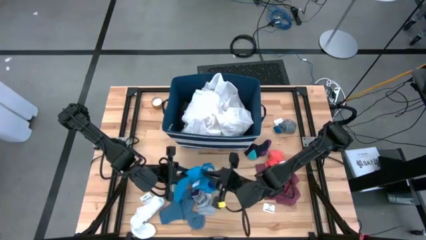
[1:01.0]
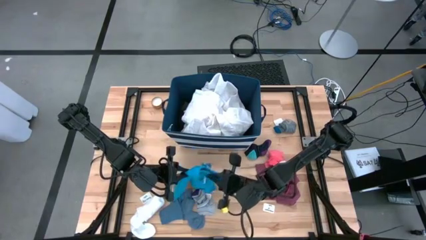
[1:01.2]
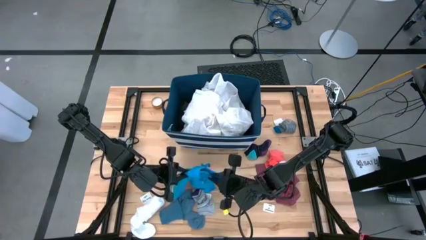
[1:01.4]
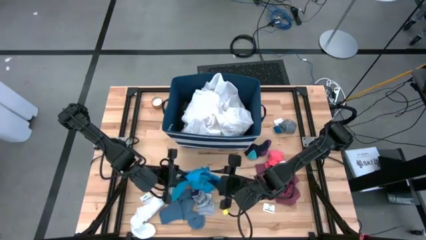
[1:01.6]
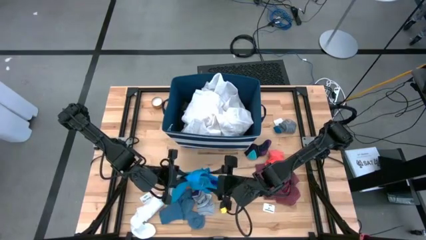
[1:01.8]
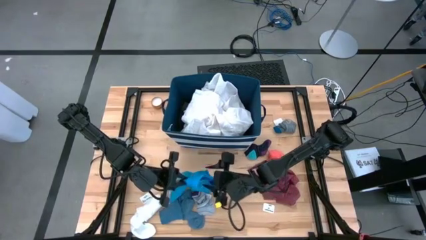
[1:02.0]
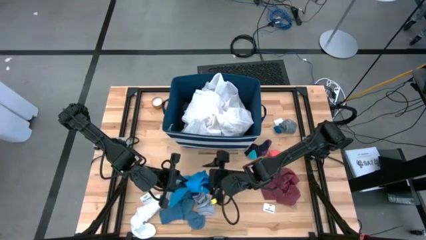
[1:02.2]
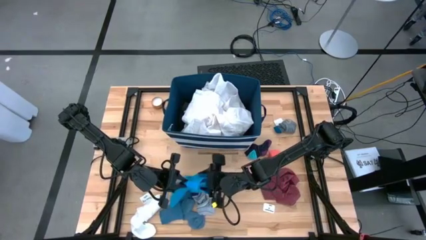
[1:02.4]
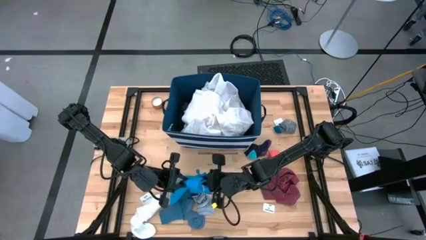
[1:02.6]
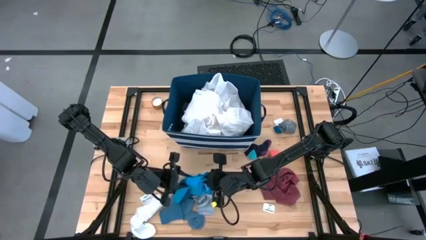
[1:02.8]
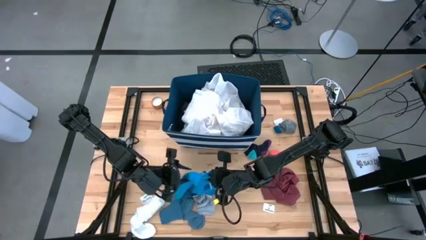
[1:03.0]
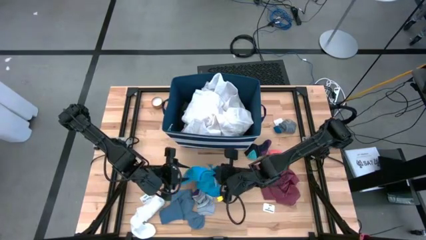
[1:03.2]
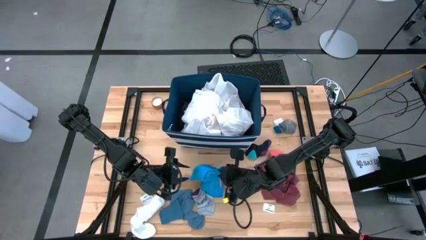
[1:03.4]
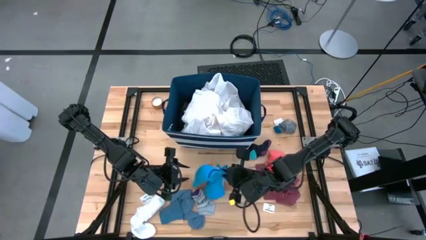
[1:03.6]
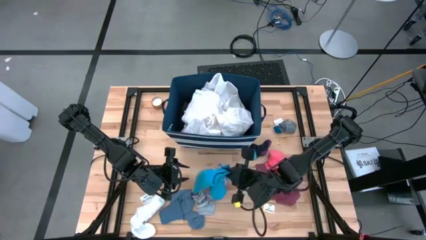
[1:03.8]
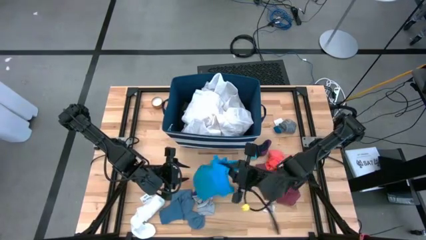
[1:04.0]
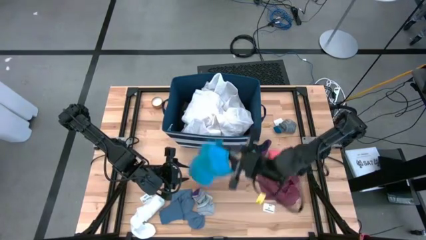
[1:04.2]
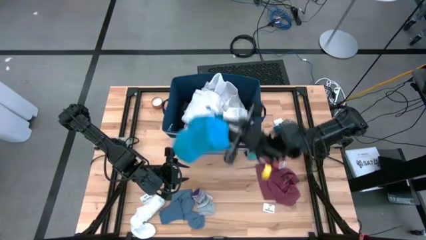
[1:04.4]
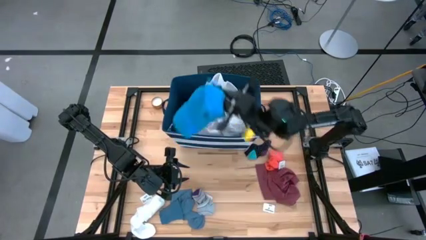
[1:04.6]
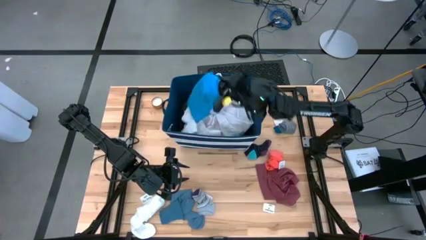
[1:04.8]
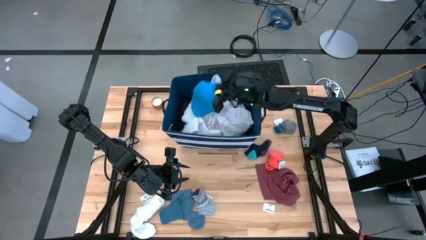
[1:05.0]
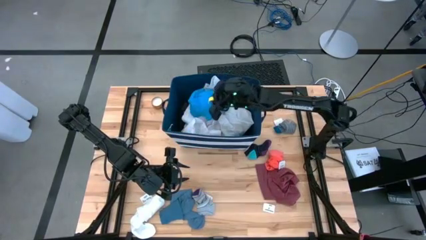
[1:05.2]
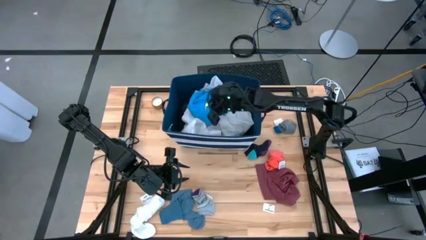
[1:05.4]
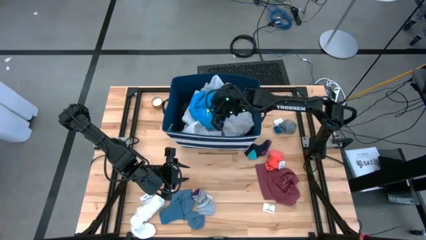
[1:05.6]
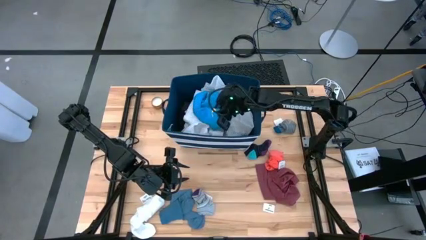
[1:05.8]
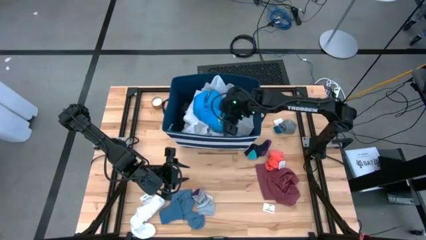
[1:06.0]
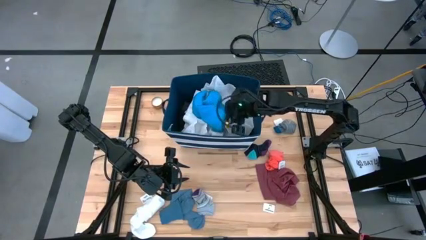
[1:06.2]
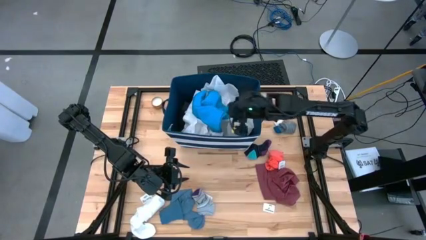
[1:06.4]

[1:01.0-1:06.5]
Task: Sort clothes
Put the blue short into the laundry organizer

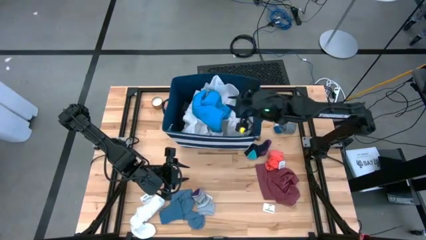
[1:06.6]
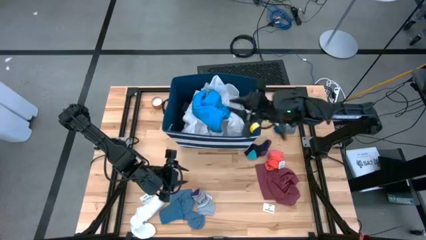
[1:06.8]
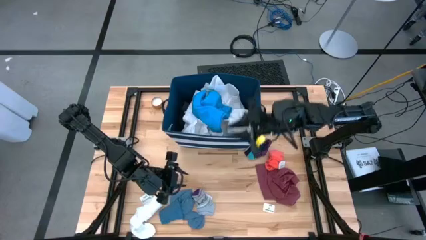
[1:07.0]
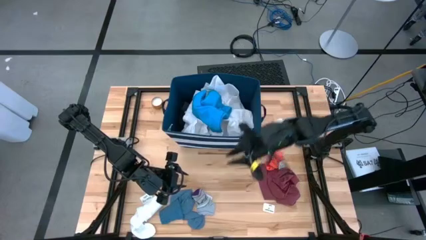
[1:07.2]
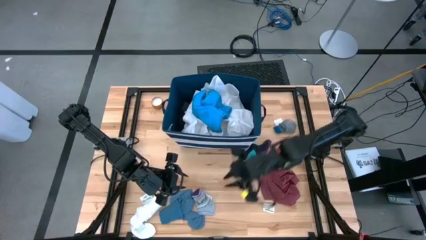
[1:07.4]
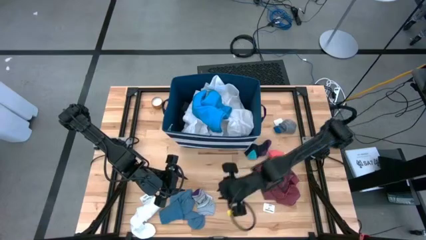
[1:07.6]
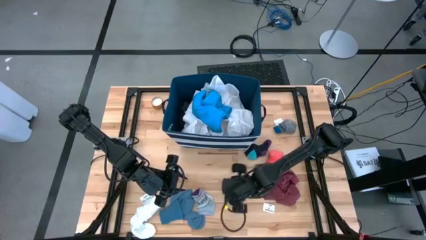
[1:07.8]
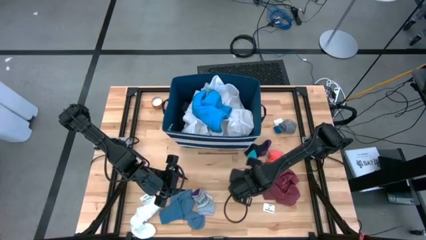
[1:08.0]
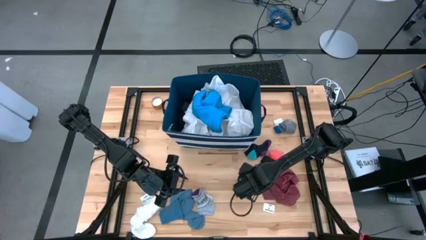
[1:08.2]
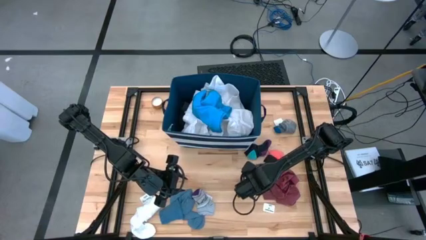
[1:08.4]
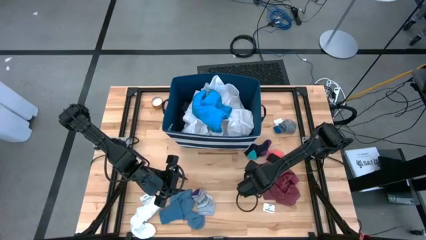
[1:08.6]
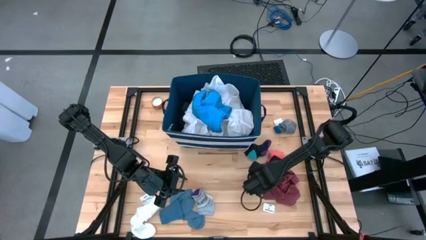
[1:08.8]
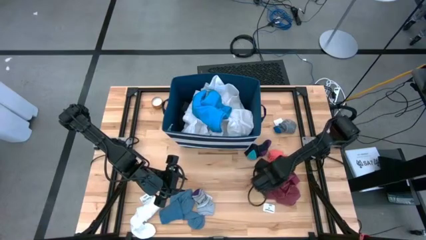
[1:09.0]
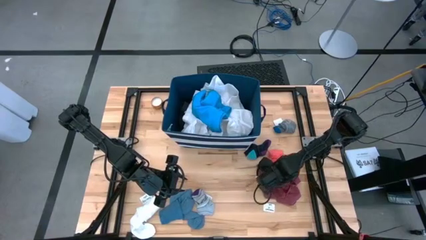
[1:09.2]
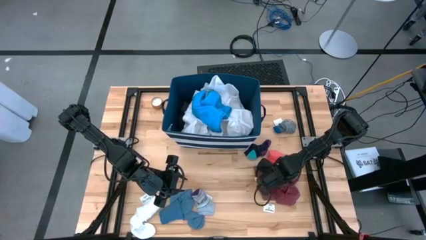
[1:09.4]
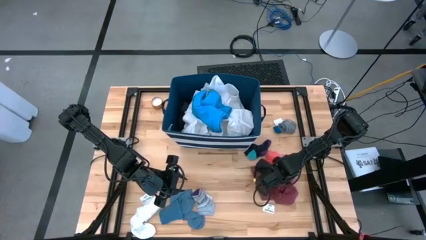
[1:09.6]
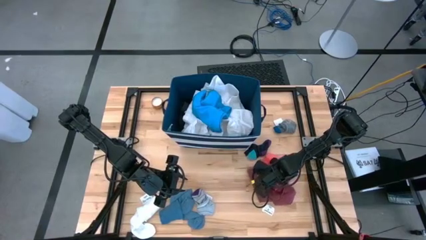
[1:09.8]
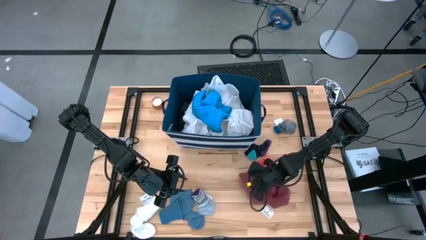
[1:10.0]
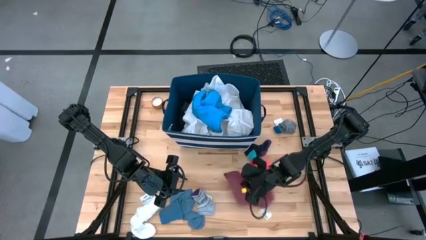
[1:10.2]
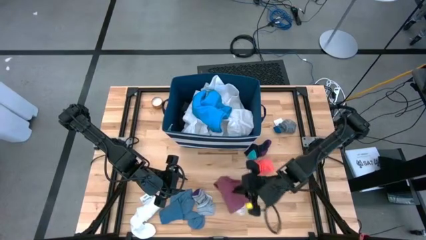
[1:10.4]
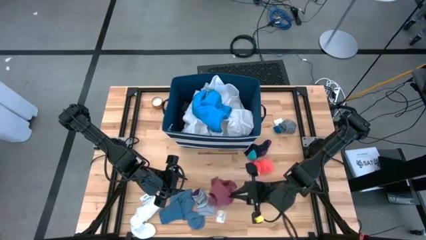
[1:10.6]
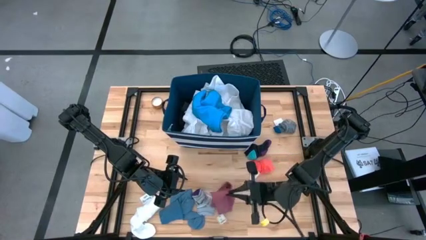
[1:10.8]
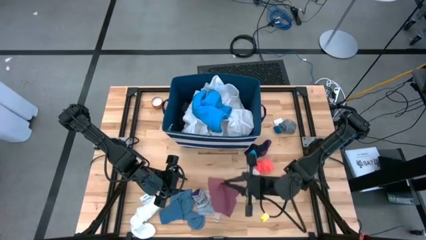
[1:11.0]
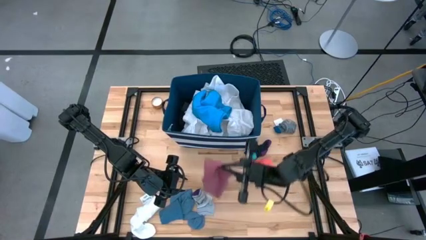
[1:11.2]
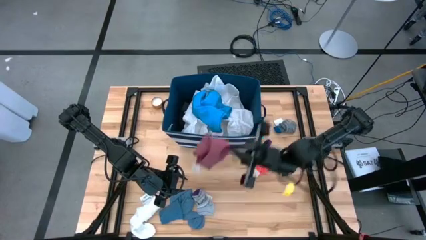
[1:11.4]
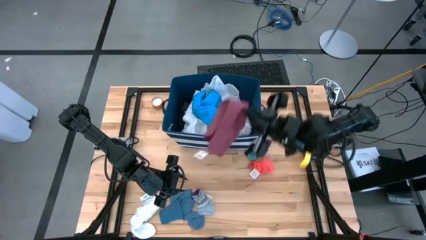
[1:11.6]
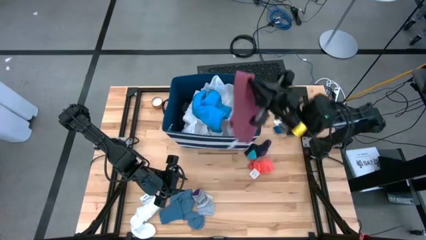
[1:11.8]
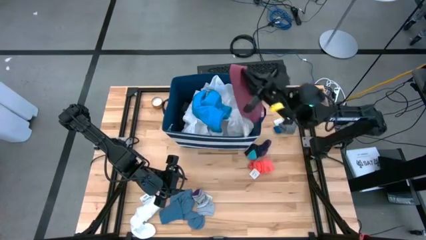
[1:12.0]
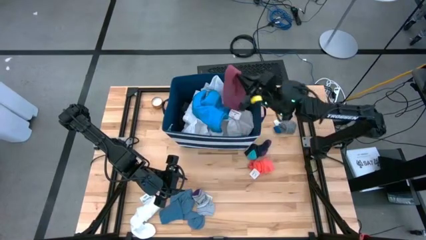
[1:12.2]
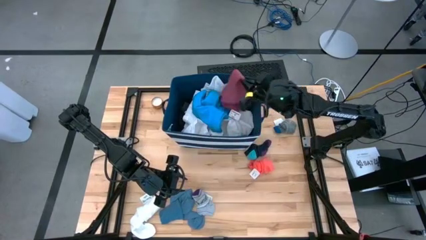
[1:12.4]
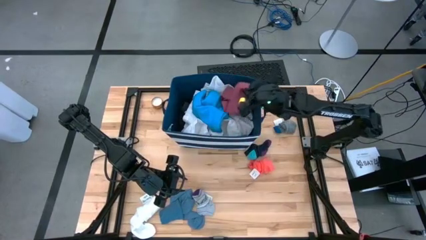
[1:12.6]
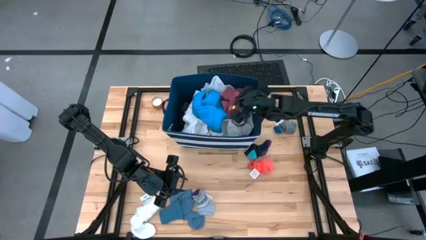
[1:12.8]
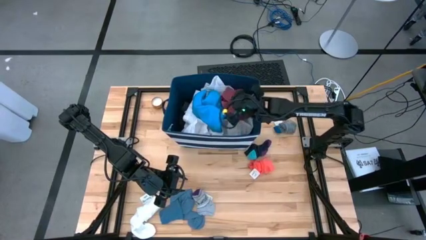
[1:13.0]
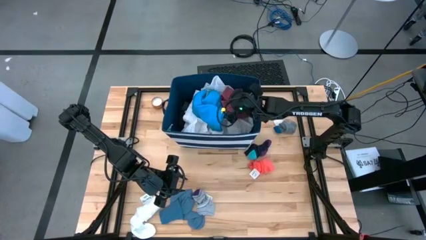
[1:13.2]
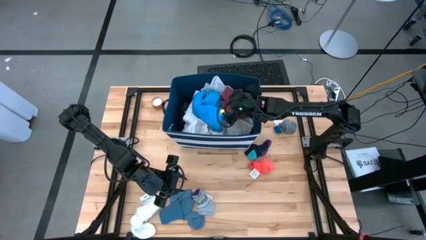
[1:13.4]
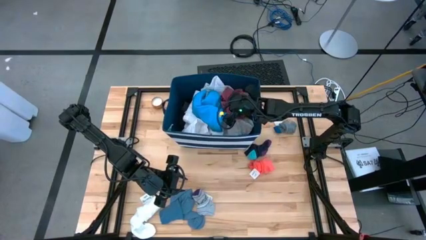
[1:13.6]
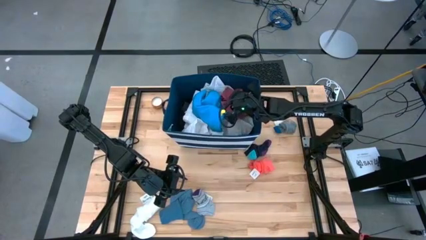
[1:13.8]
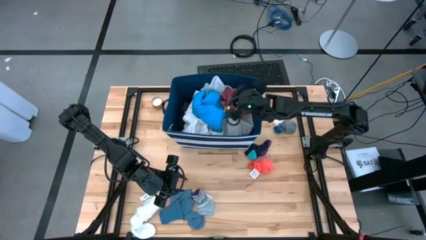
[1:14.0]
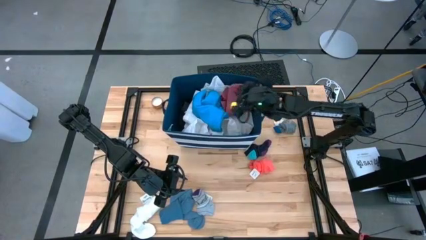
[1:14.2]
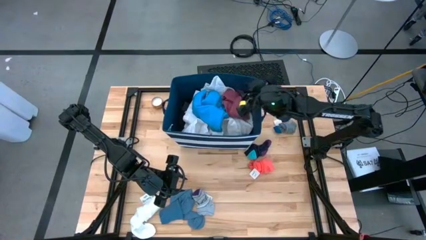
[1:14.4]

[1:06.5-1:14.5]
Put the red underwear into the white and blue laundry organizer

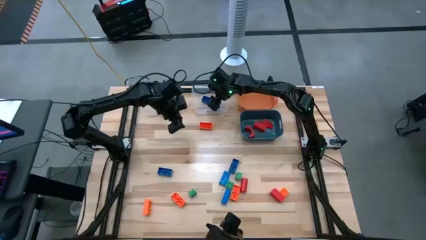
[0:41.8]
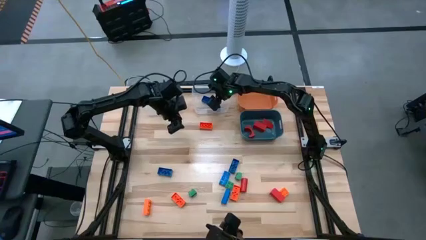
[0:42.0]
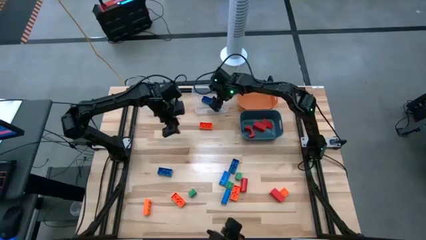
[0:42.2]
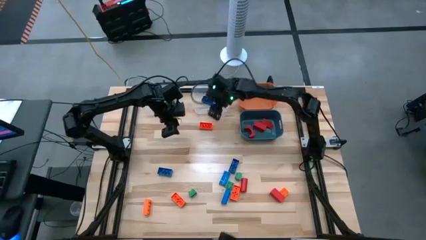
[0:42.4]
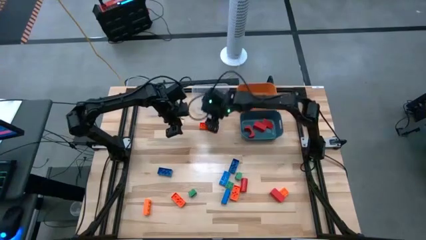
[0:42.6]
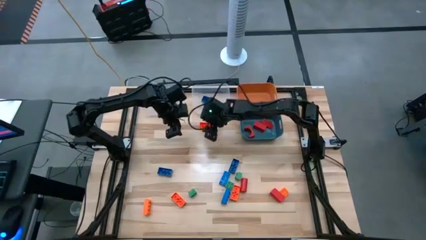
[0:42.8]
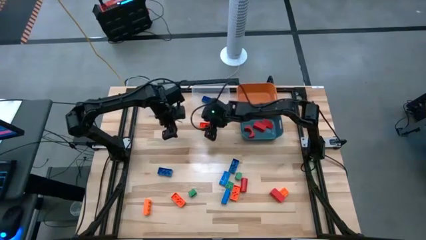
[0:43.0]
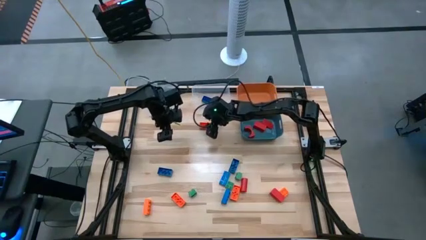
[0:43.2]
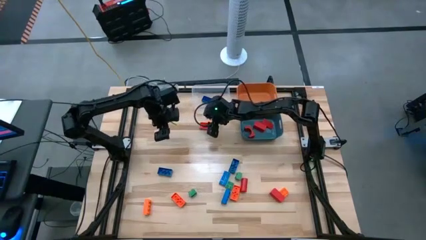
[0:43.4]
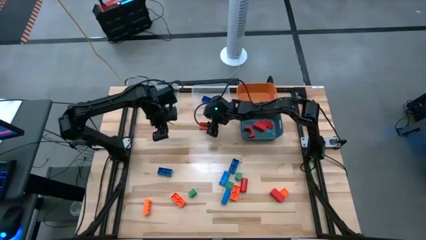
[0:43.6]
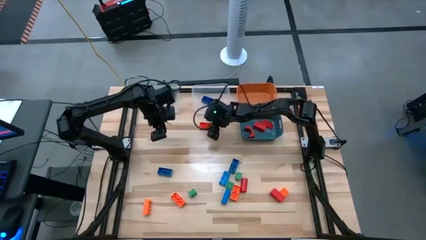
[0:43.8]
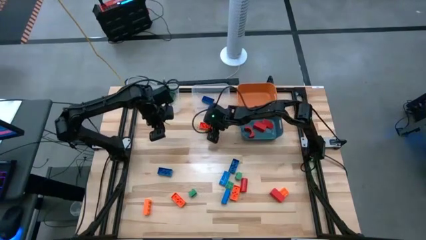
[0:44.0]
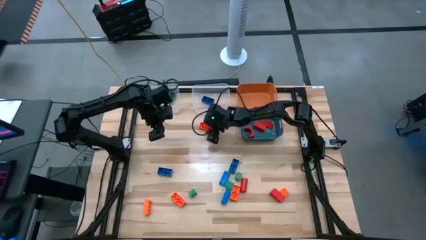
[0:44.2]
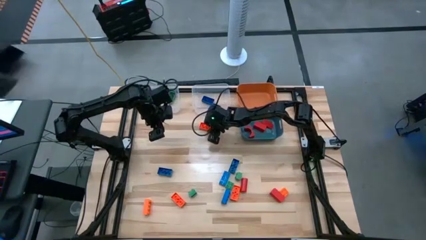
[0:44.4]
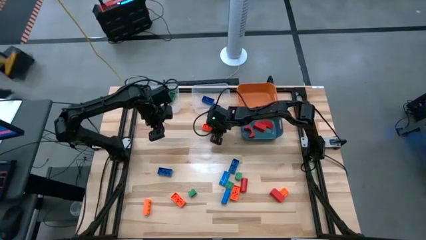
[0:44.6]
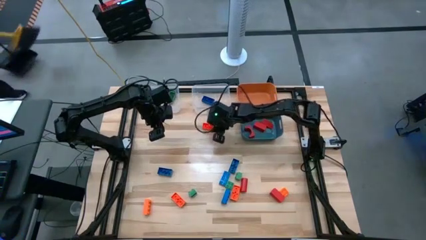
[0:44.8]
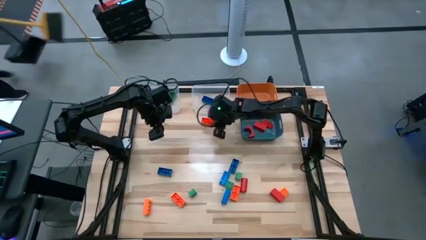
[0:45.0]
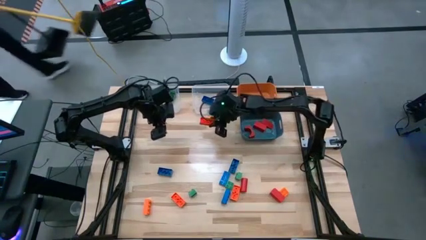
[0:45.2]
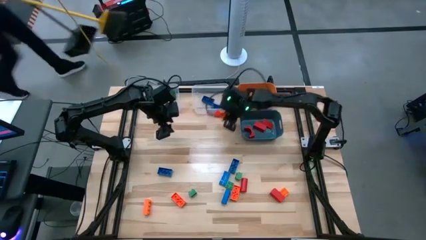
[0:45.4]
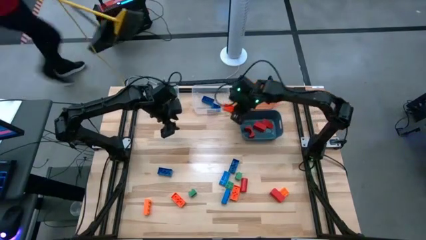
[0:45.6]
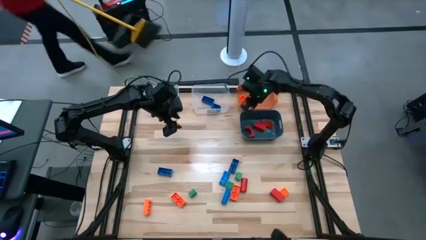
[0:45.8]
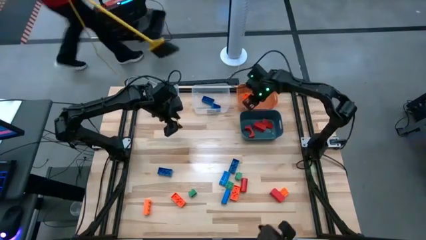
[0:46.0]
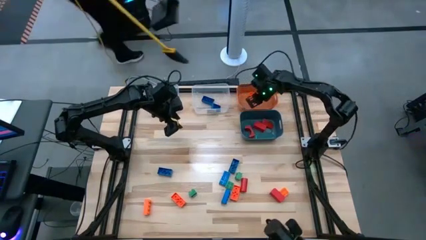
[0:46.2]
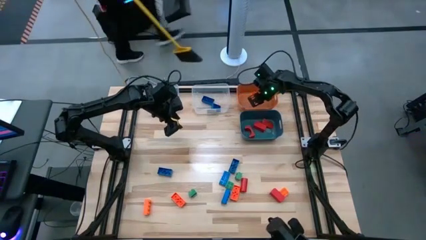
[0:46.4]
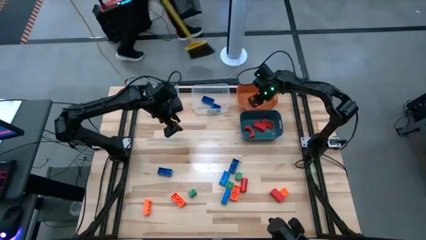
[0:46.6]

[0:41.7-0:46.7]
Task: Sort blocks
Put the orange game piece into the orange bin
